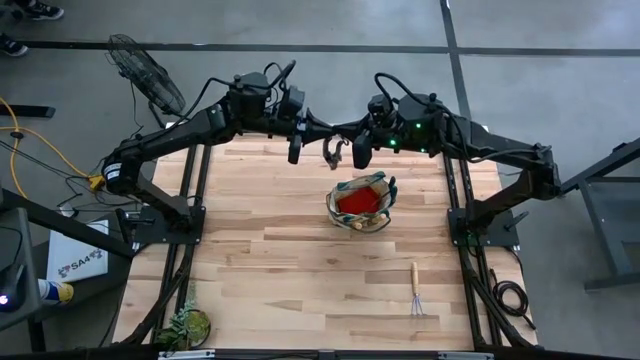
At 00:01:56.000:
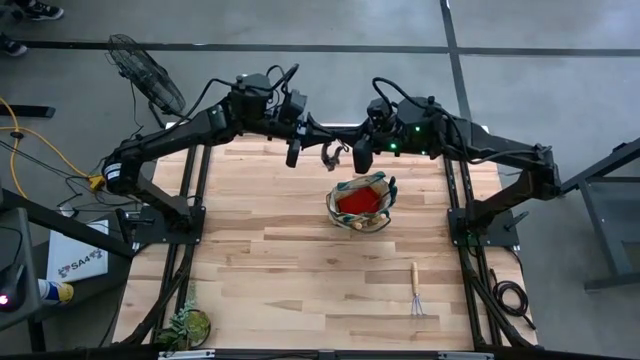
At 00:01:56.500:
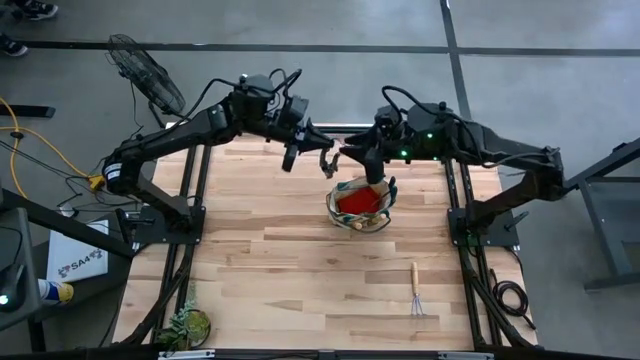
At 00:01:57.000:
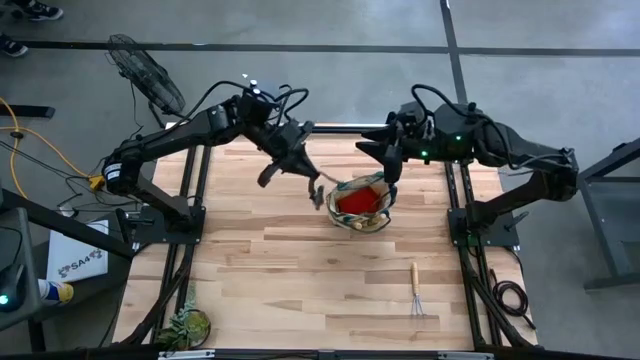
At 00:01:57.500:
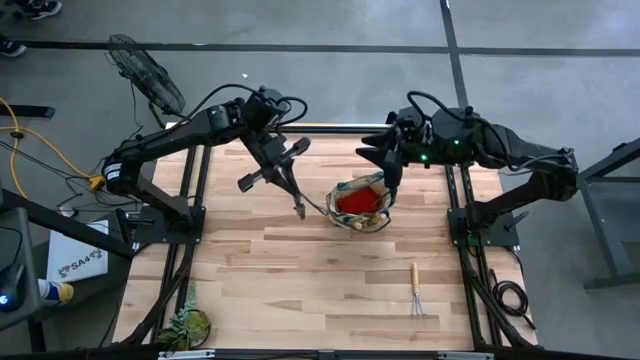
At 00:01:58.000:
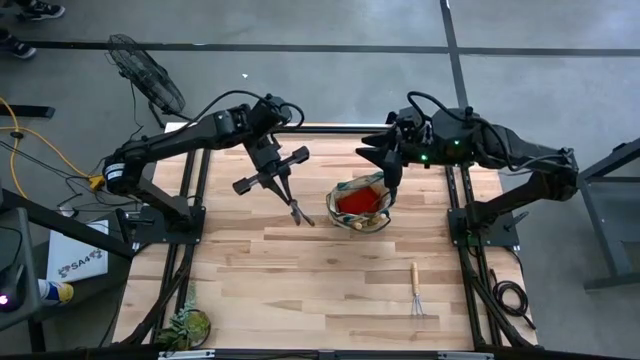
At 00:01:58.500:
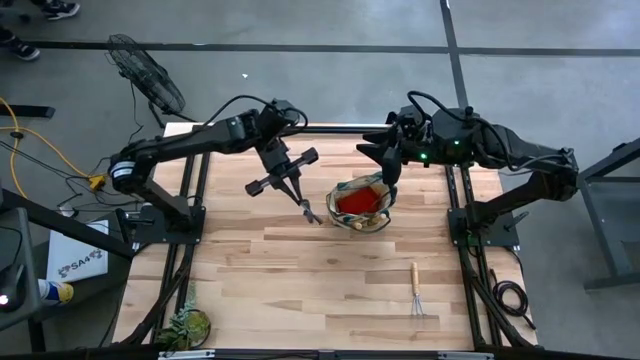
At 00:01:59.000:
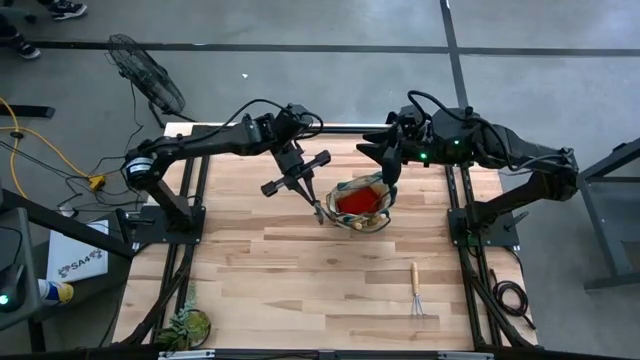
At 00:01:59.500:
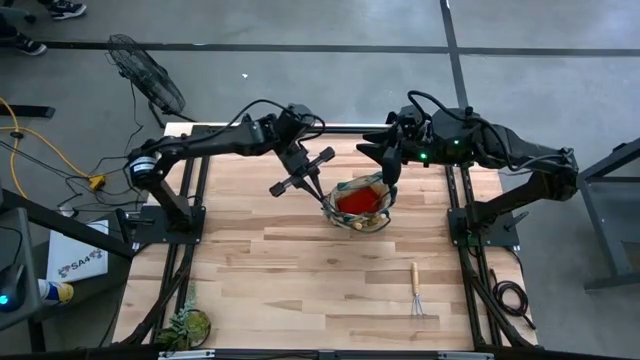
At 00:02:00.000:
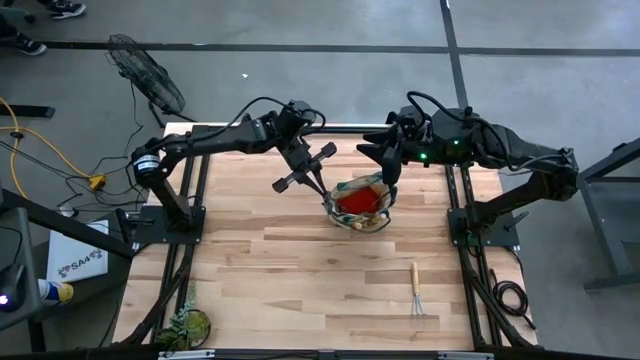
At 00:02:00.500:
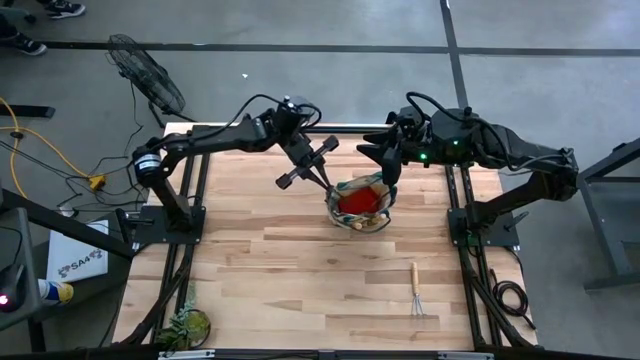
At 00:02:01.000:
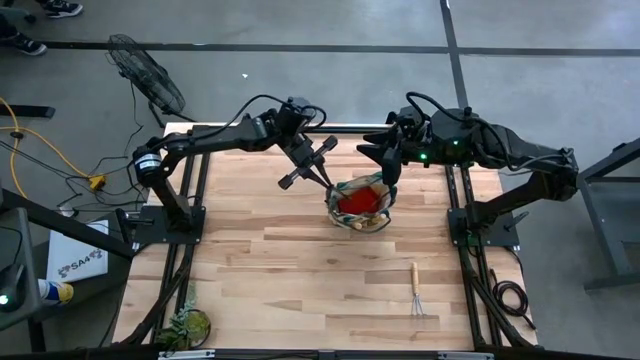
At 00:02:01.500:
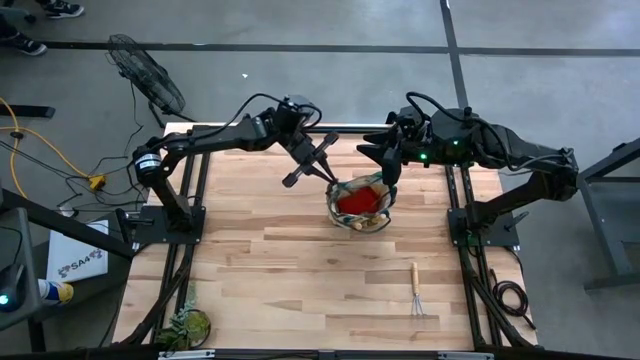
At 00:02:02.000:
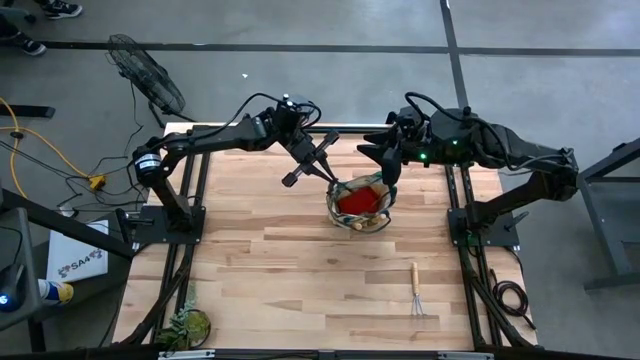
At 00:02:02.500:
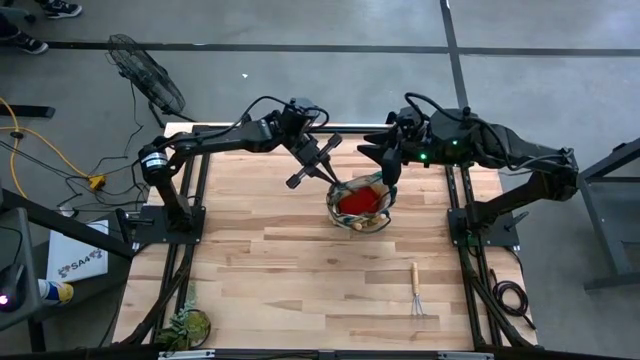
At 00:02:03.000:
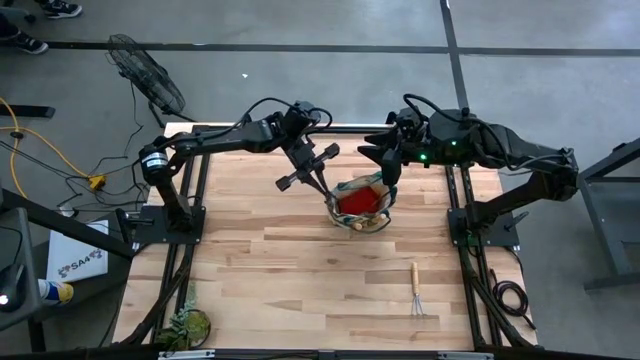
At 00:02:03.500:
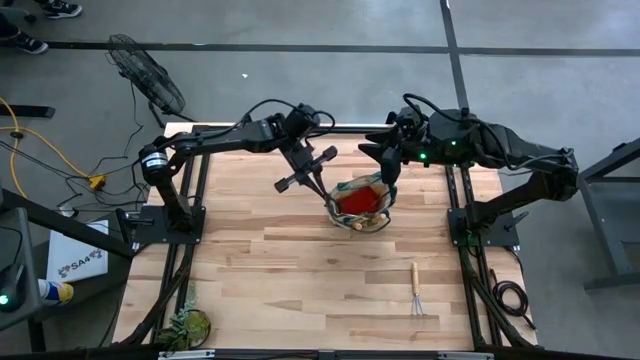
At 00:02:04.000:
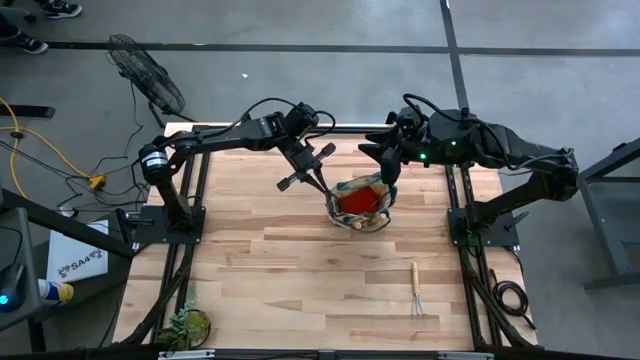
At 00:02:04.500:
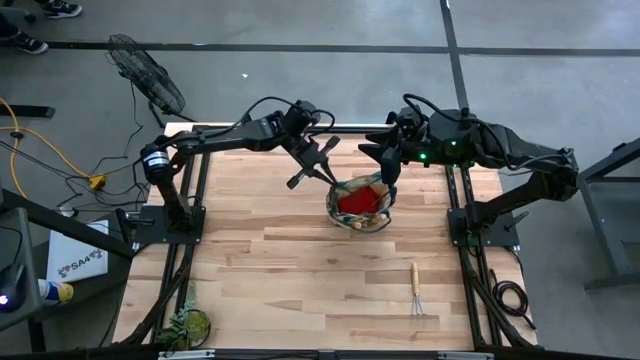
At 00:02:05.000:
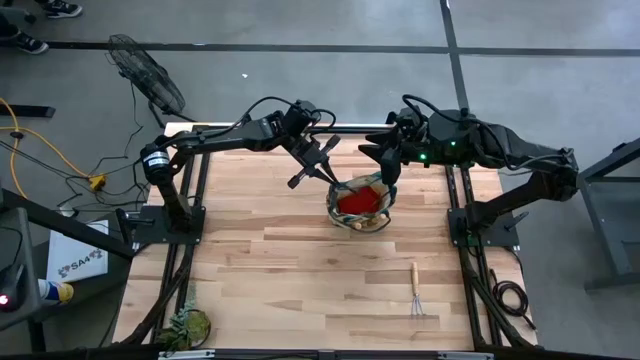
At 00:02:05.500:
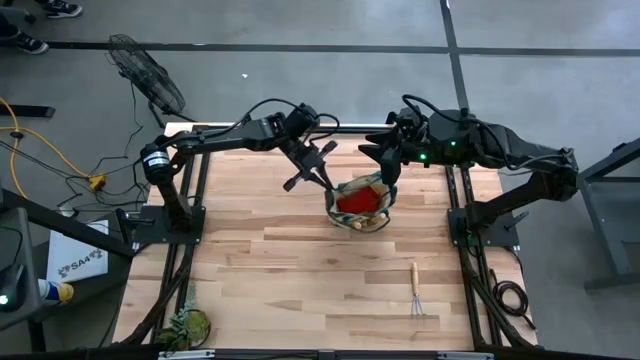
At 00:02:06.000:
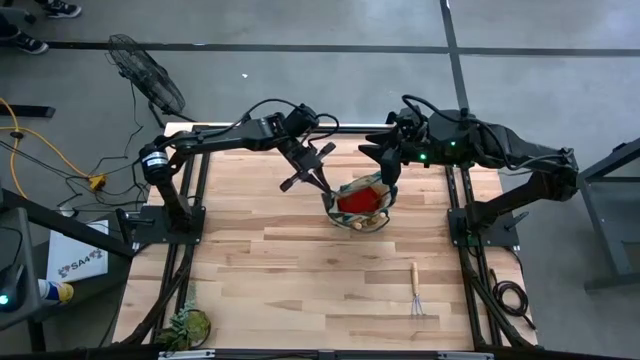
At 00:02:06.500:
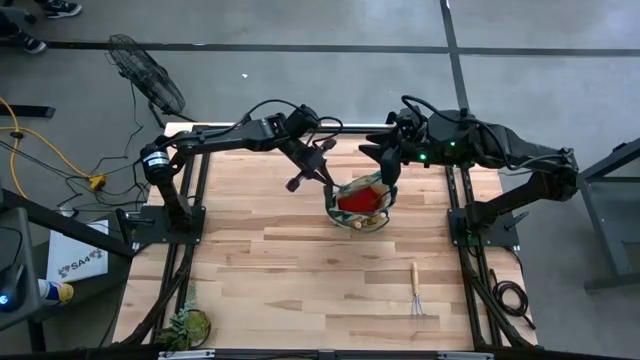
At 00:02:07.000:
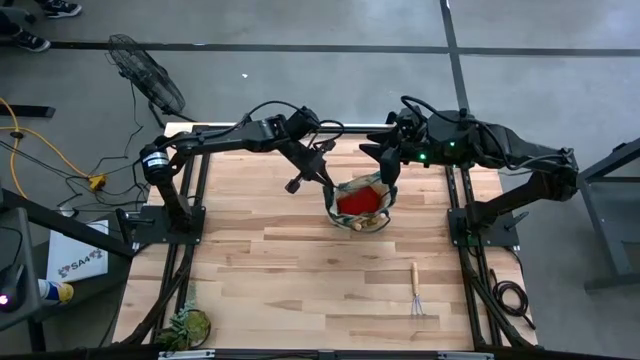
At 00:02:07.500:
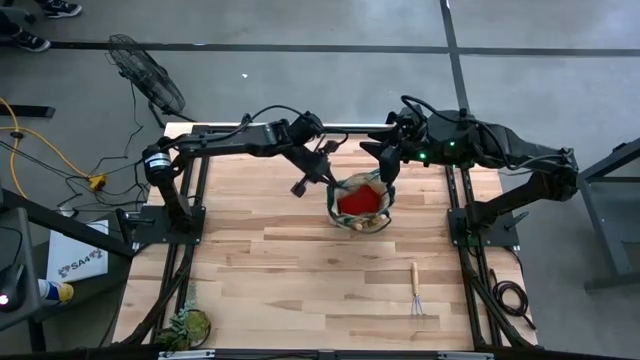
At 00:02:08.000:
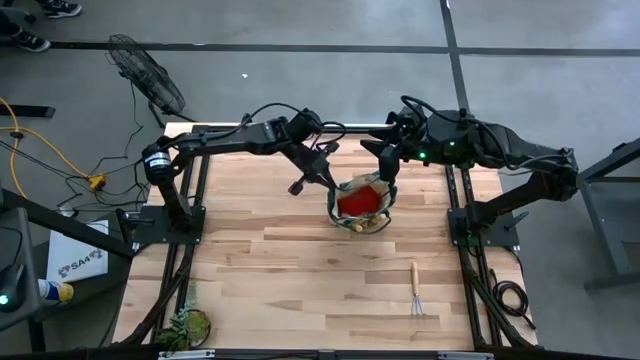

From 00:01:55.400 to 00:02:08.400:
Task: Pick & Place Garden tools in Gardening bag
Put the shear scissor into the gardening bag

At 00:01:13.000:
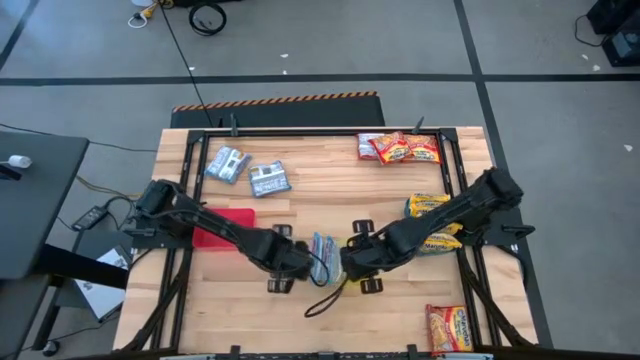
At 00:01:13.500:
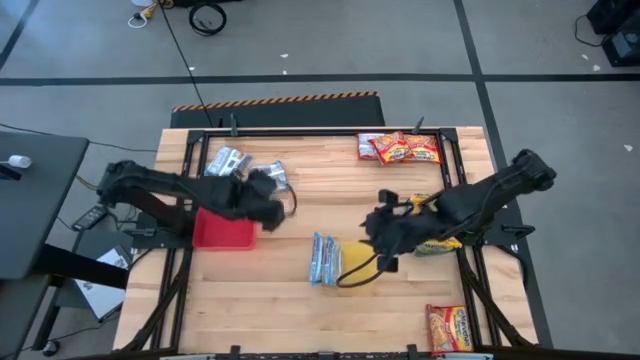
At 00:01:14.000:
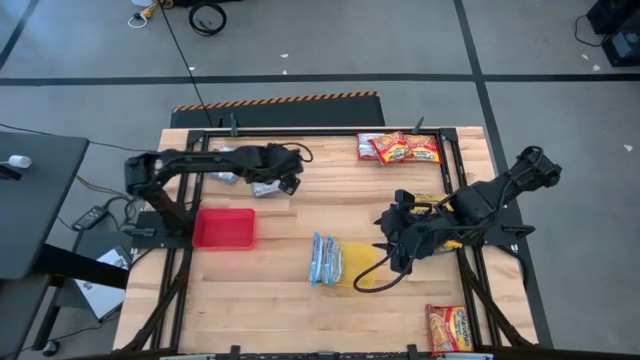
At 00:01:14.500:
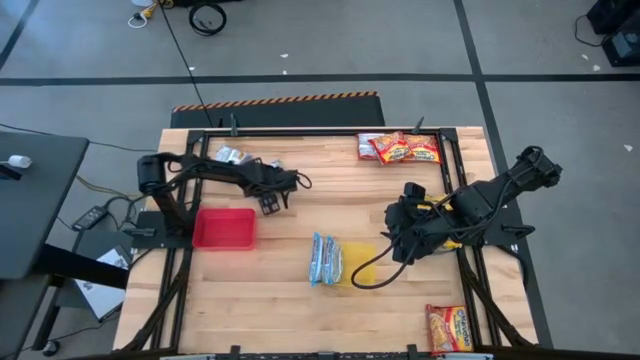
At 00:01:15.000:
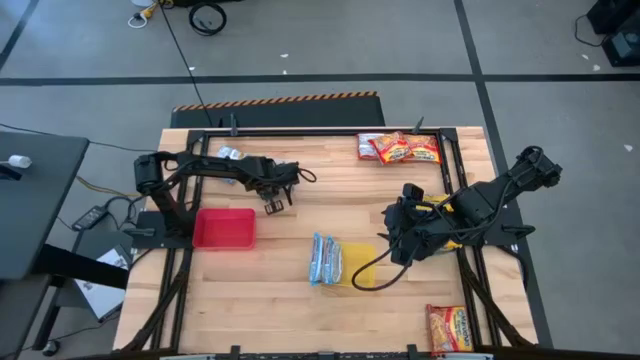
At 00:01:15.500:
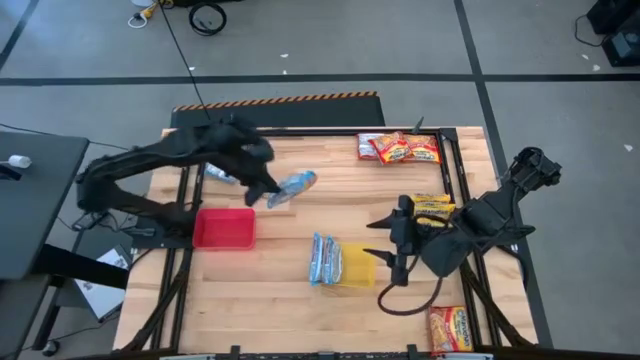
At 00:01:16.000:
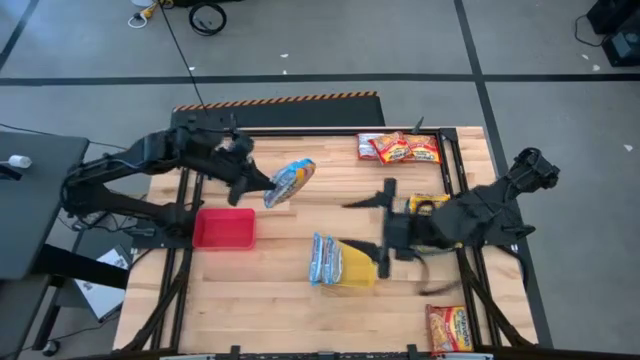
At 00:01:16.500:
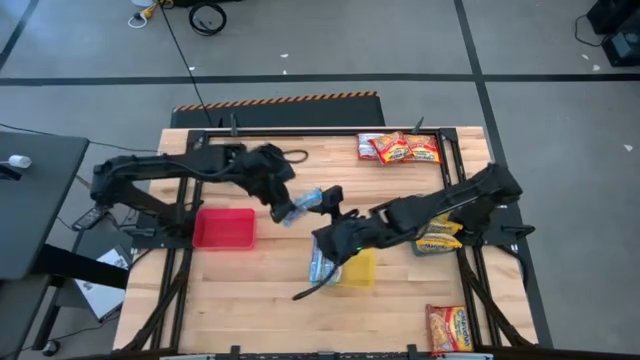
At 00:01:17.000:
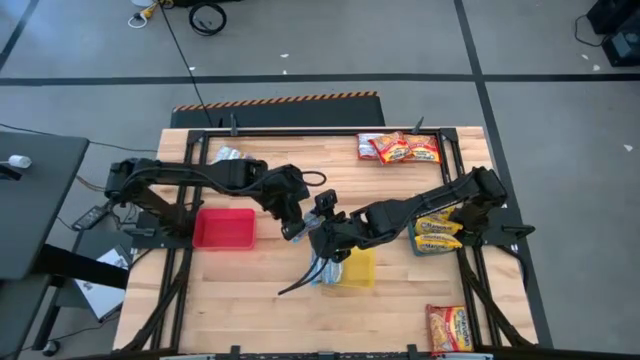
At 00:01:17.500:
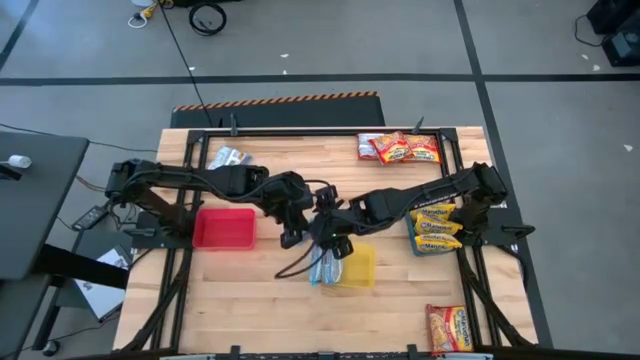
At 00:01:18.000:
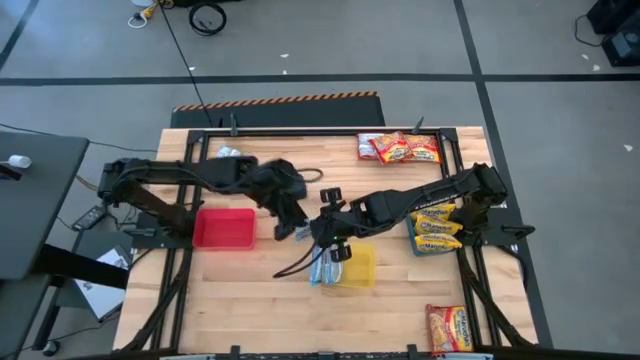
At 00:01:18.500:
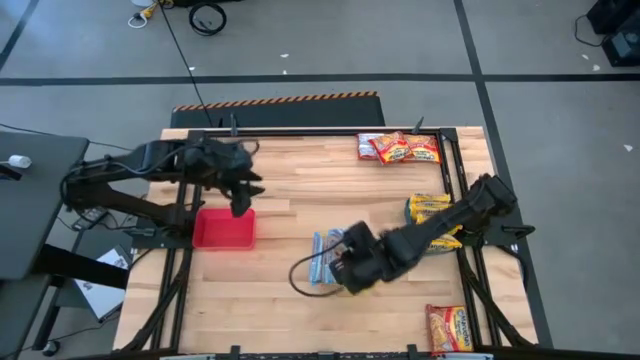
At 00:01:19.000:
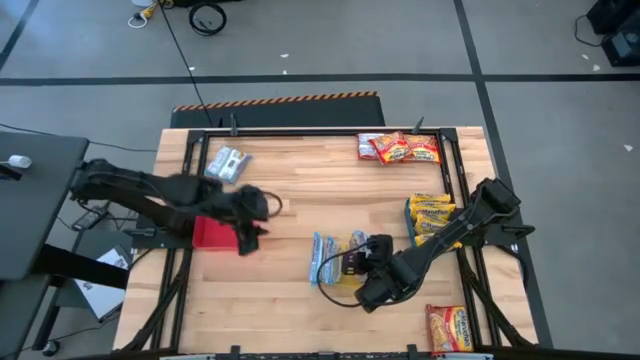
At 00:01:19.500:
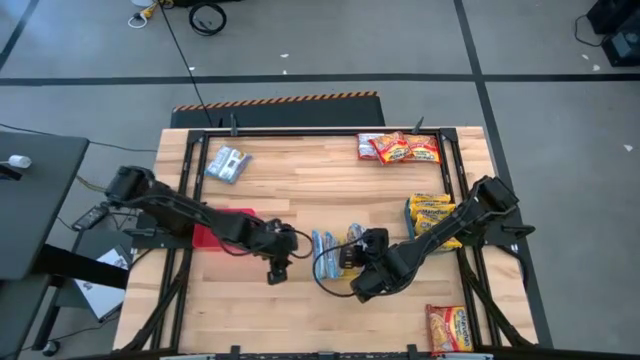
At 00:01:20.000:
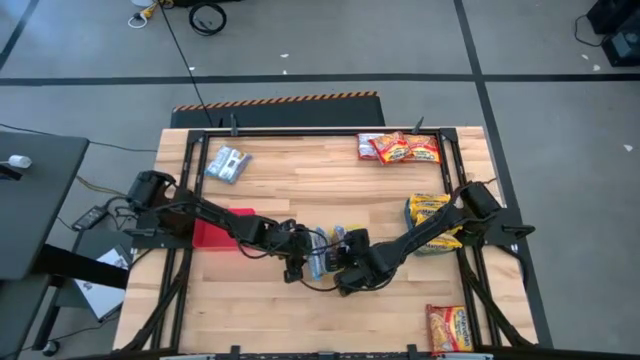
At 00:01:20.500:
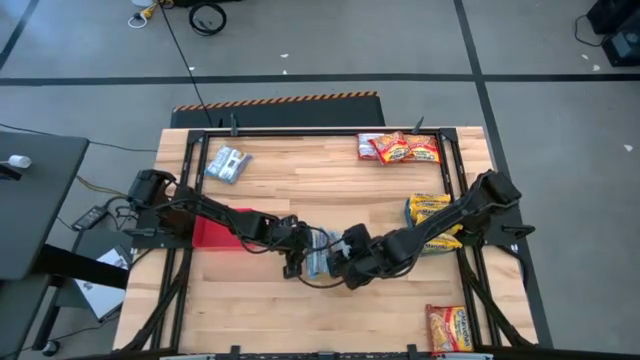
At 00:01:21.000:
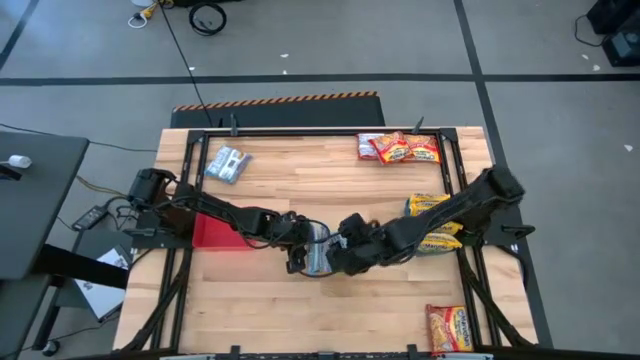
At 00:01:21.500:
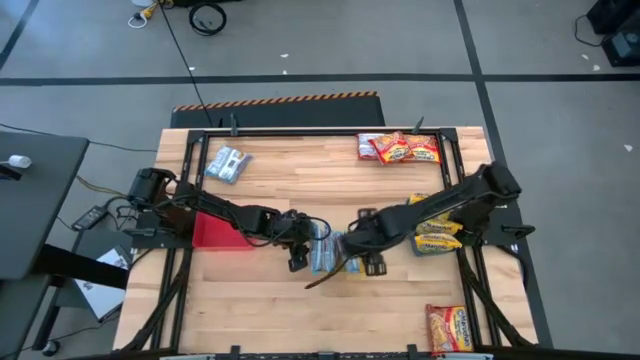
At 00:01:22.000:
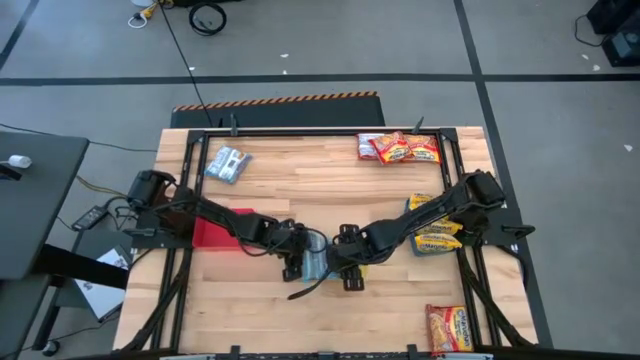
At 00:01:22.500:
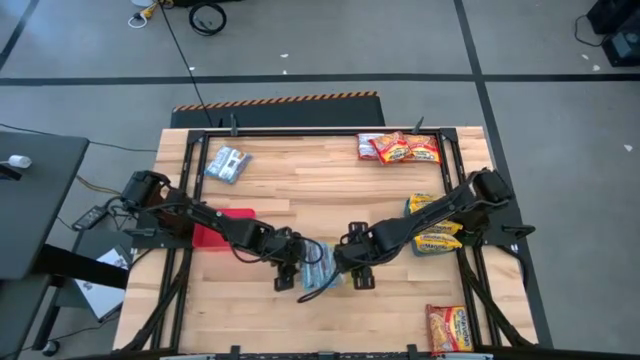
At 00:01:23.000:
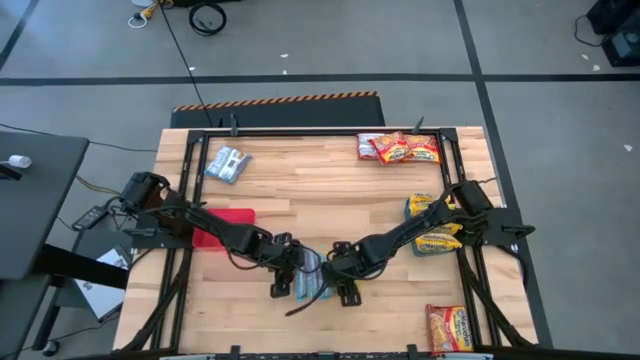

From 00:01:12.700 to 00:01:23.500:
Task: Sort Maruchan noodles
Put the light blue noodle pack into the yellow bin
